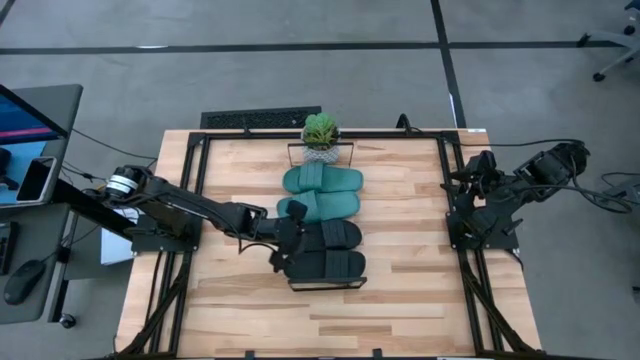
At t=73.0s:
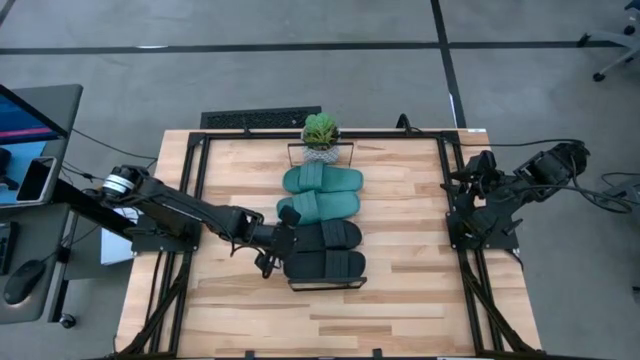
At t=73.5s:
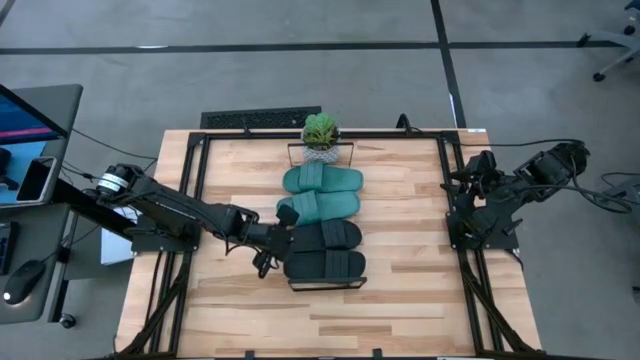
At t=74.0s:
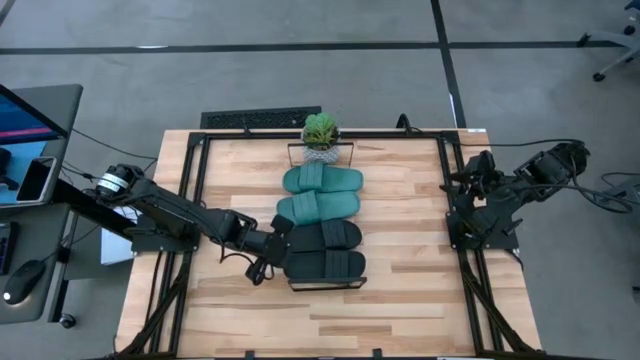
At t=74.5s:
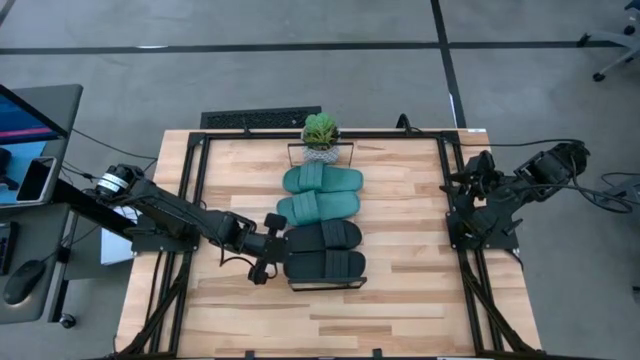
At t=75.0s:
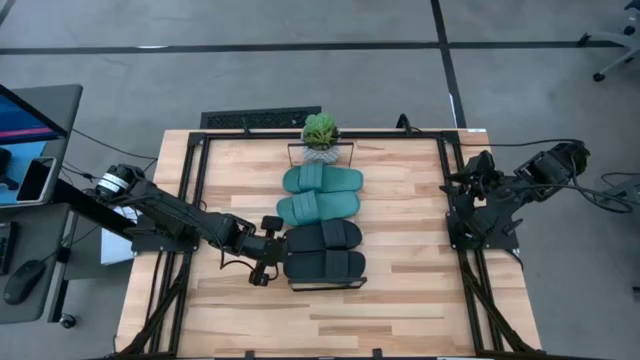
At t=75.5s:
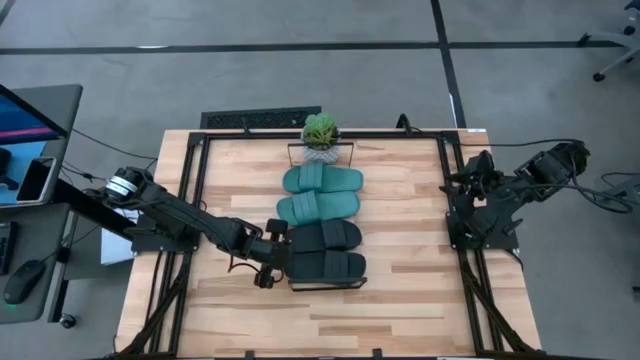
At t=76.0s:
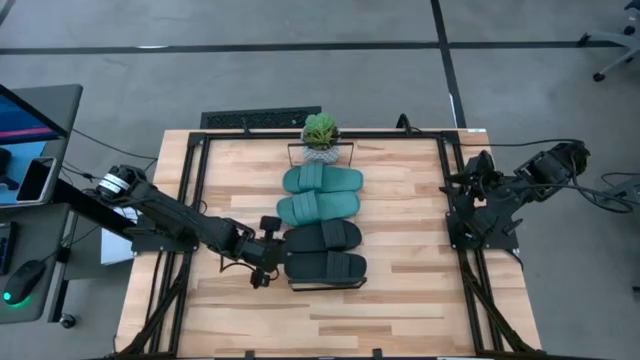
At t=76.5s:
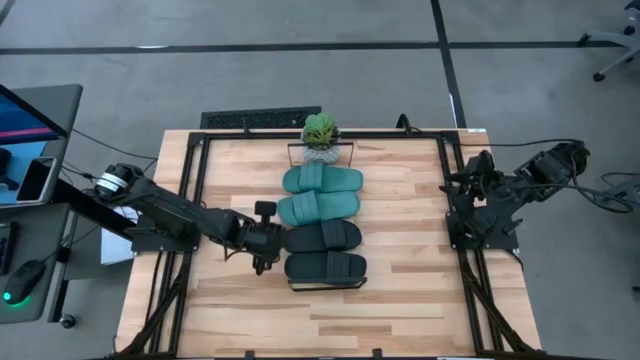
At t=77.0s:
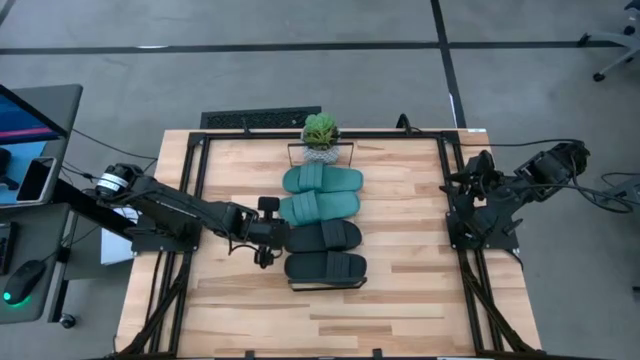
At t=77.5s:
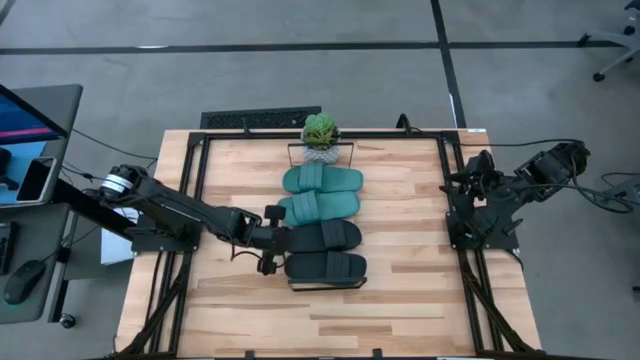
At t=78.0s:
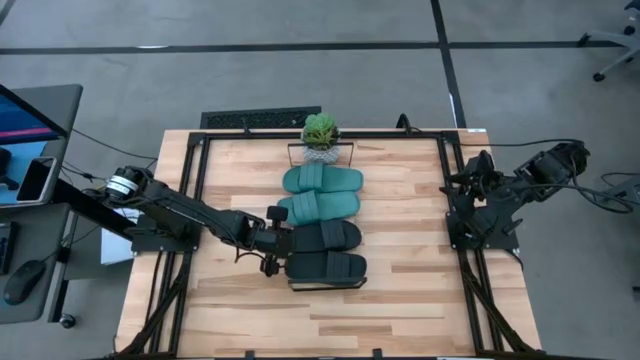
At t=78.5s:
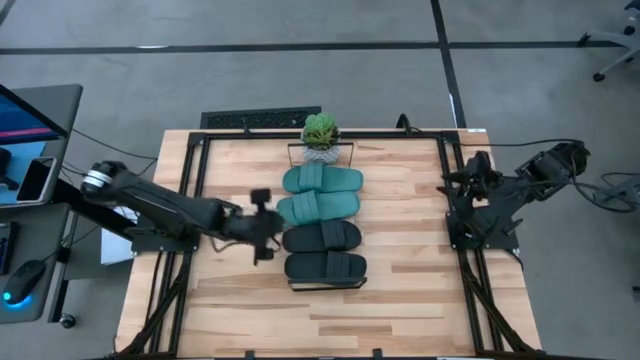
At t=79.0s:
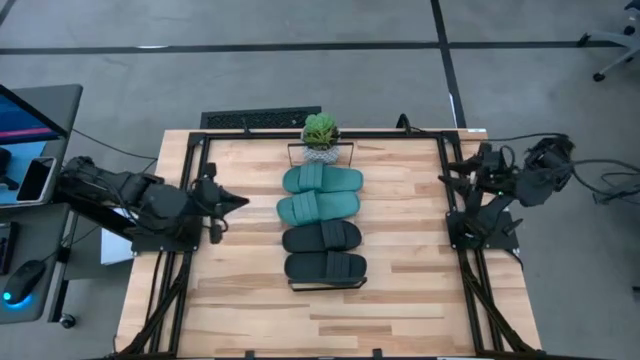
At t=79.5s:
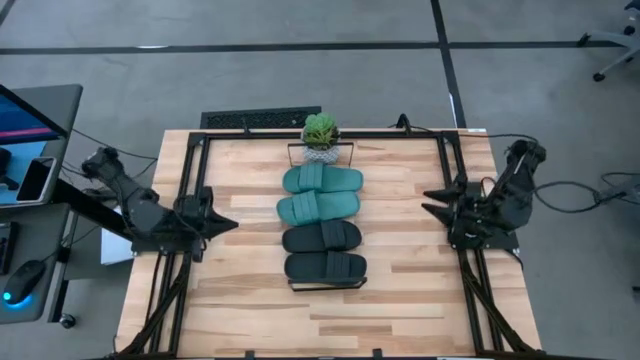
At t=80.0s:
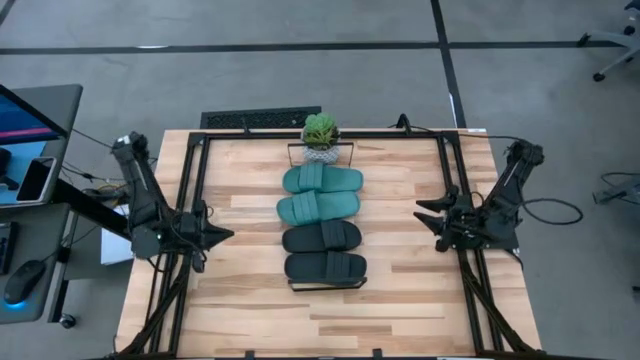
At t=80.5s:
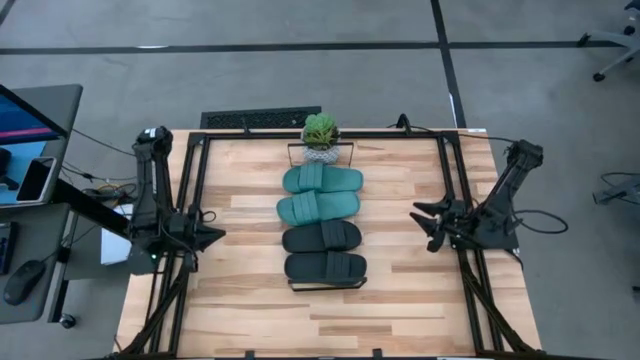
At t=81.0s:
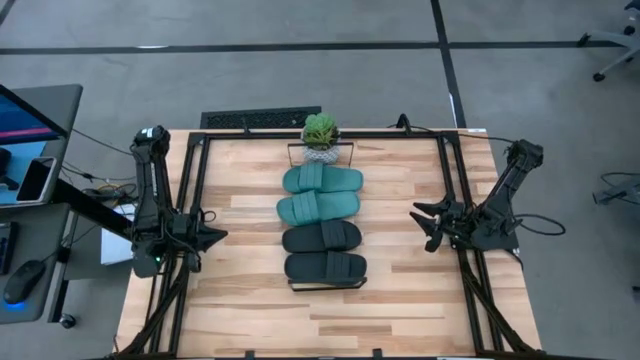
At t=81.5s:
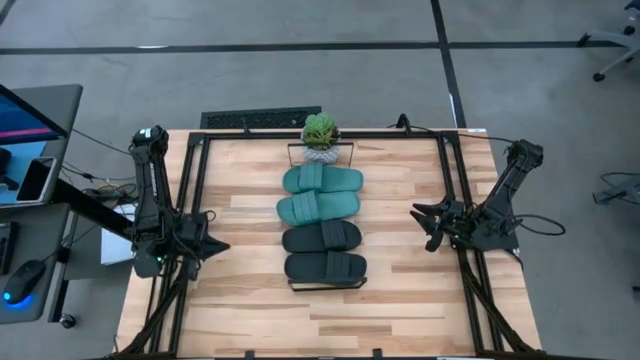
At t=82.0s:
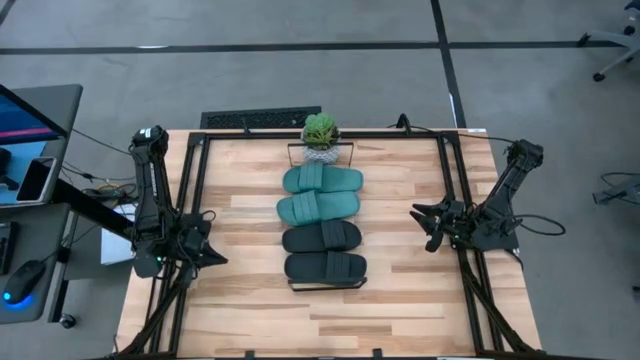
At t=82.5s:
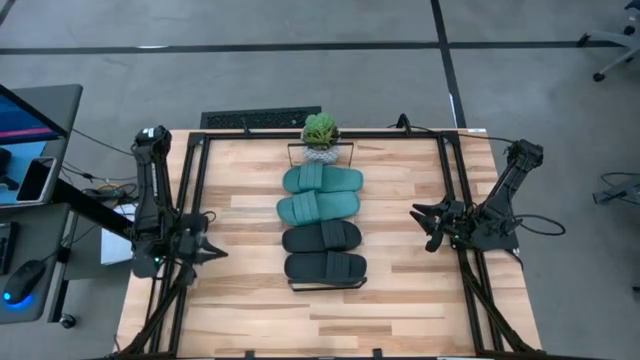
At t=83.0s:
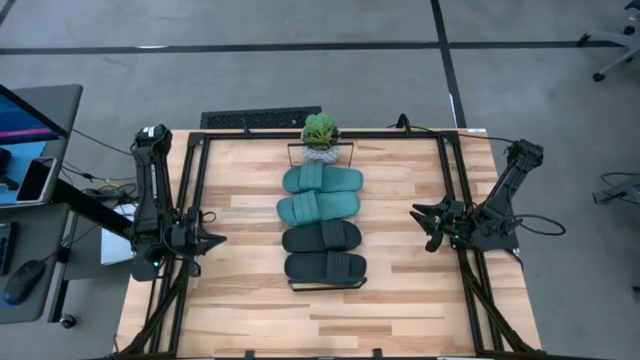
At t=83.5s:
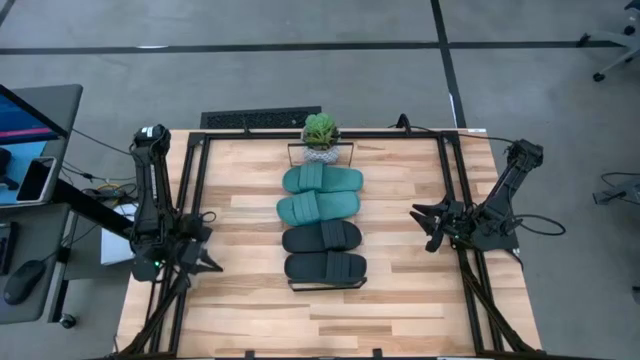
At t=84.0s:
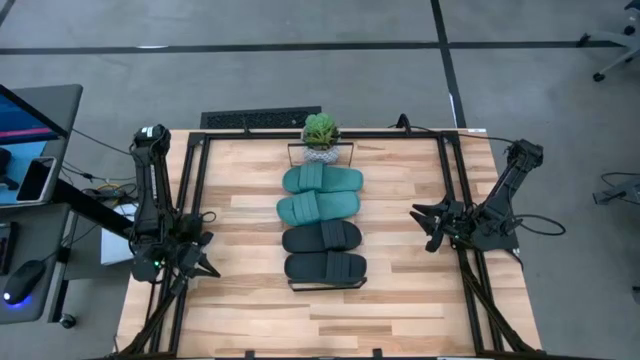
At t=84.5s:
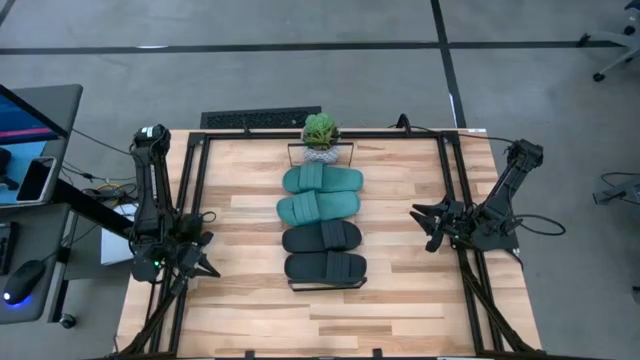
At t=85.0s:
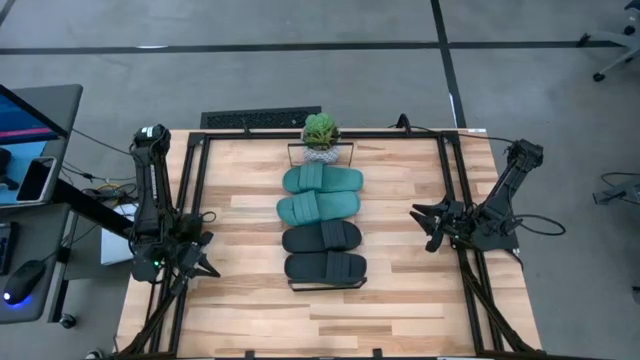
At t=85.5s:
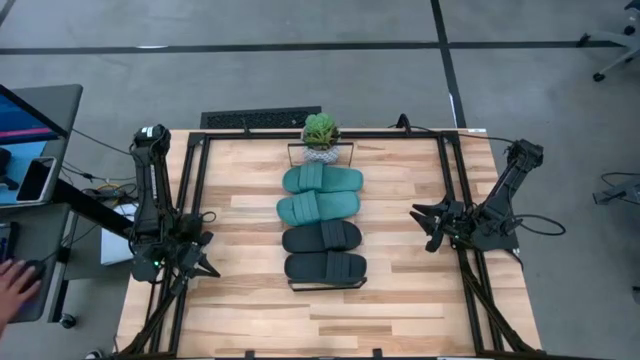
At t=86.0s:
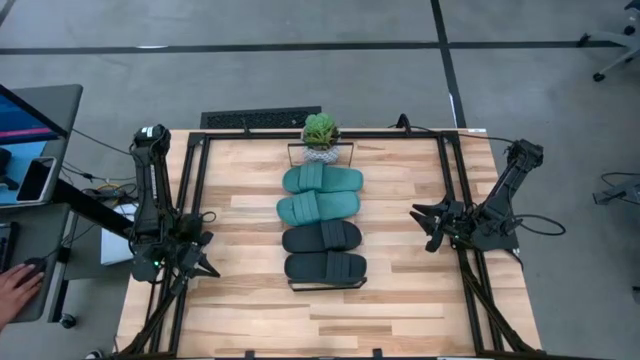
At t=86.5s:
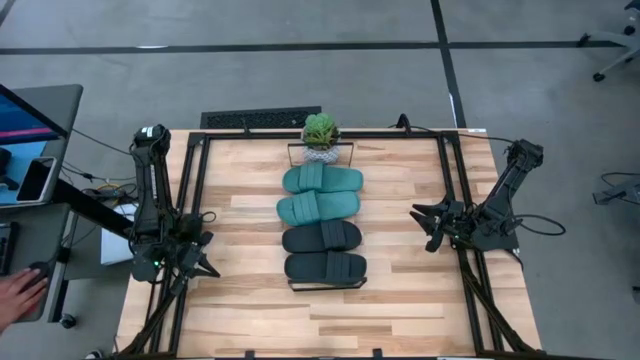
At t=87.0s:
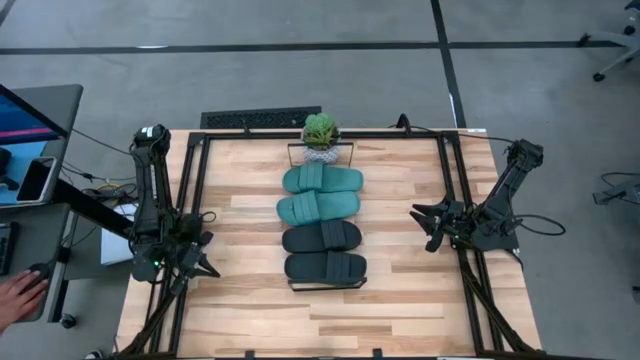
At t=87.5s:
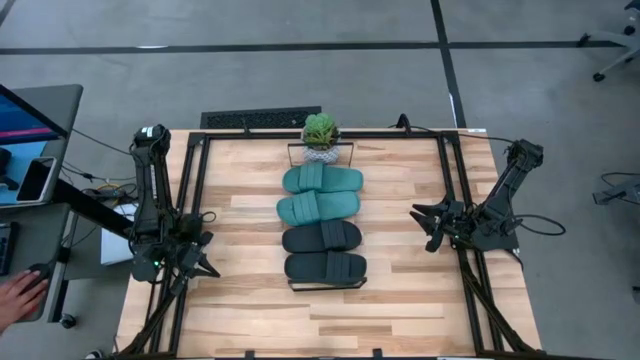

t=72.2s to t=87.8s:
Task: Pick and place slides into the shelf
Return to Home Position

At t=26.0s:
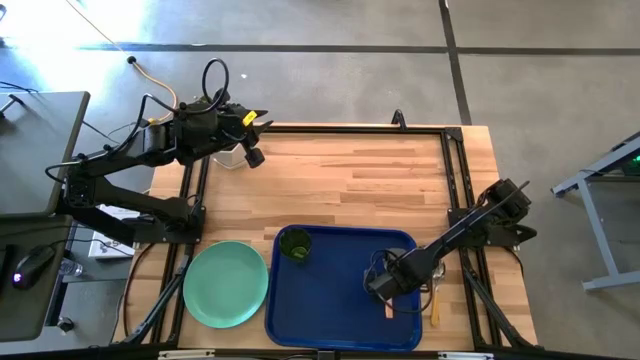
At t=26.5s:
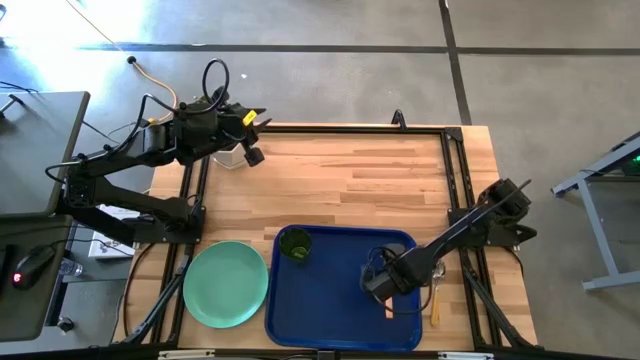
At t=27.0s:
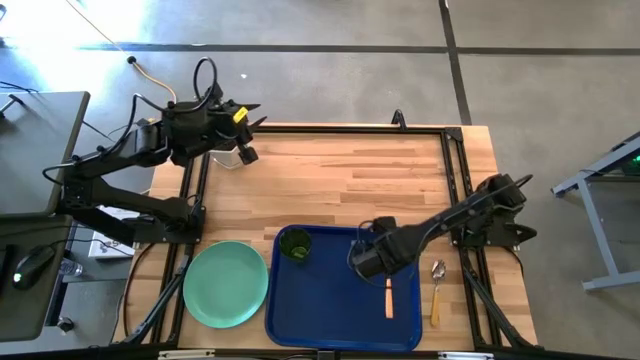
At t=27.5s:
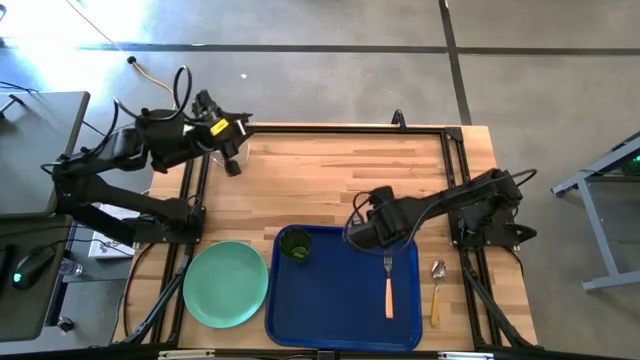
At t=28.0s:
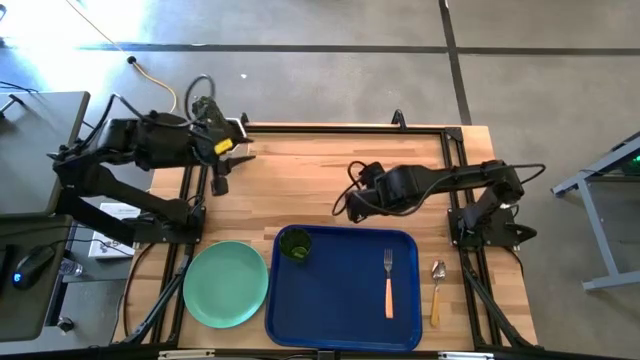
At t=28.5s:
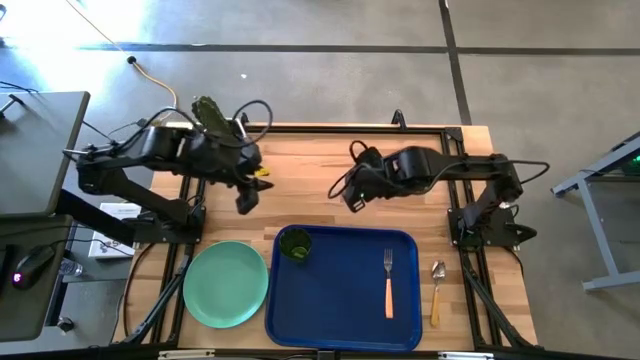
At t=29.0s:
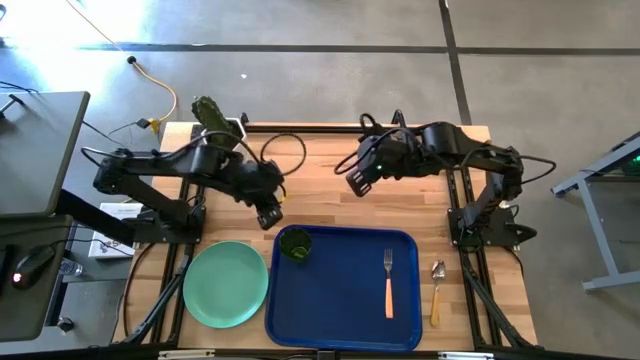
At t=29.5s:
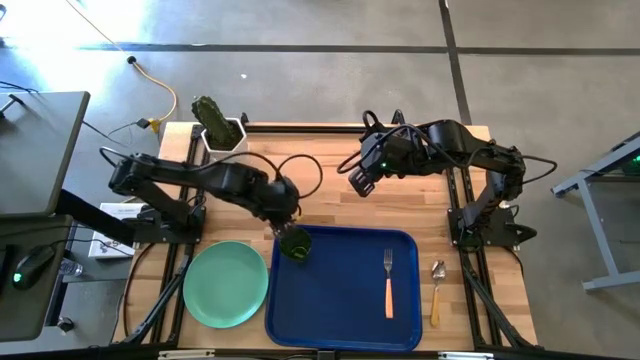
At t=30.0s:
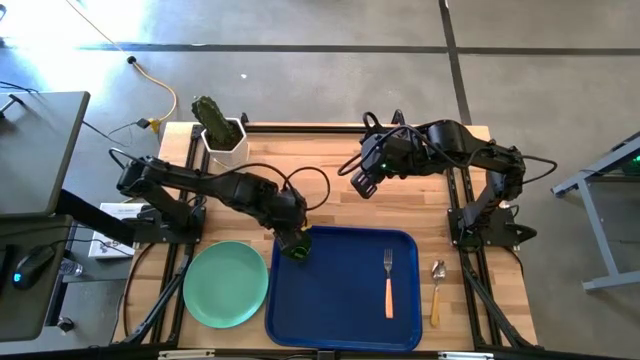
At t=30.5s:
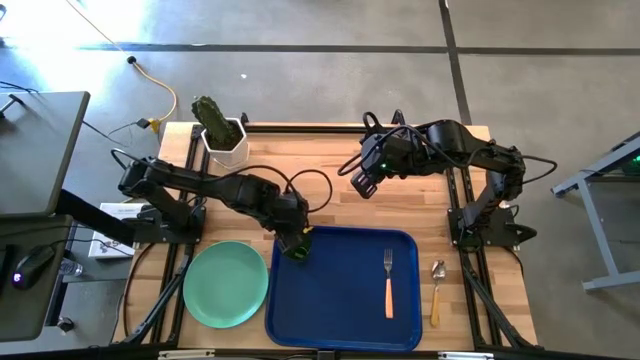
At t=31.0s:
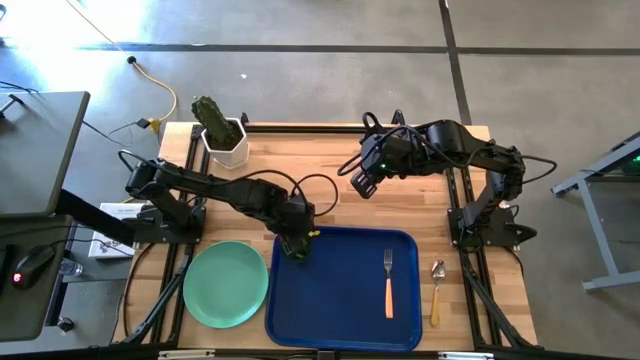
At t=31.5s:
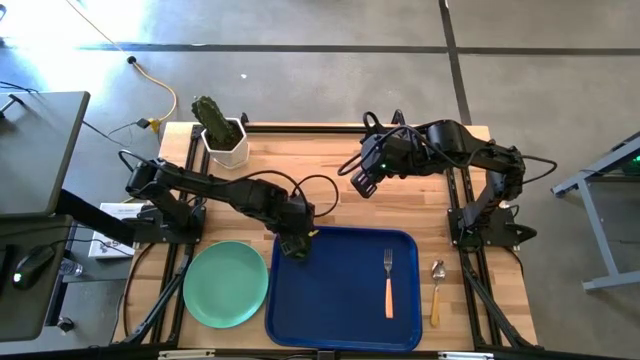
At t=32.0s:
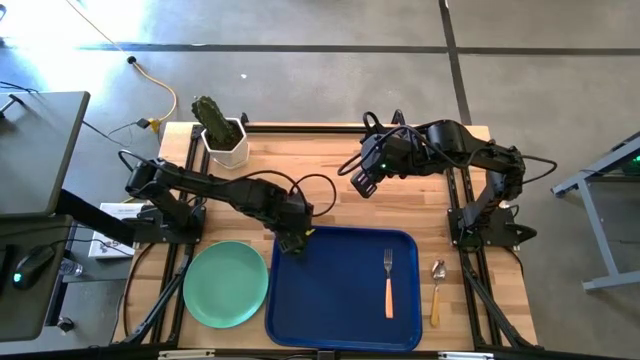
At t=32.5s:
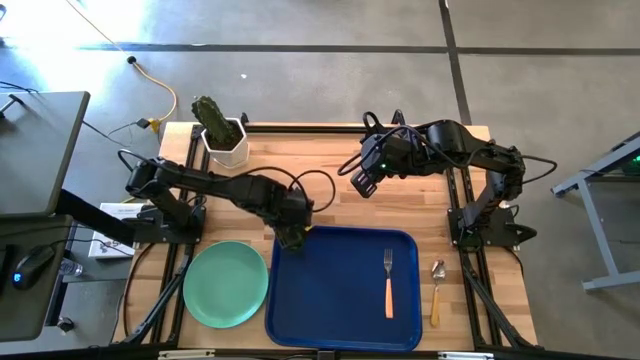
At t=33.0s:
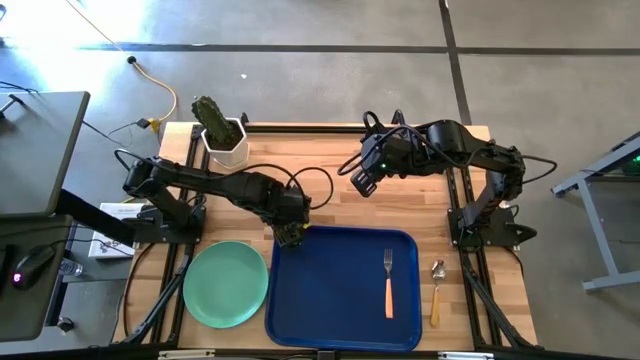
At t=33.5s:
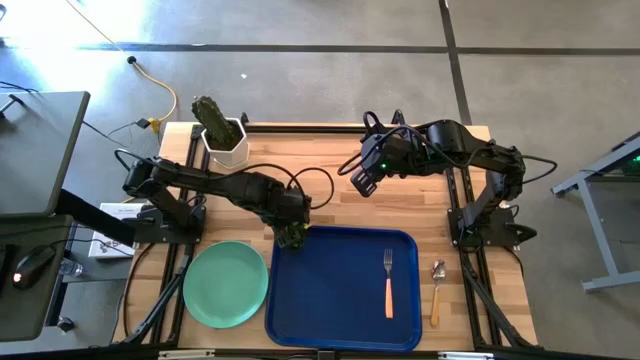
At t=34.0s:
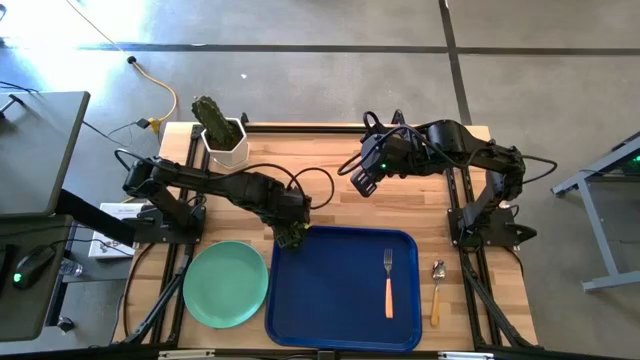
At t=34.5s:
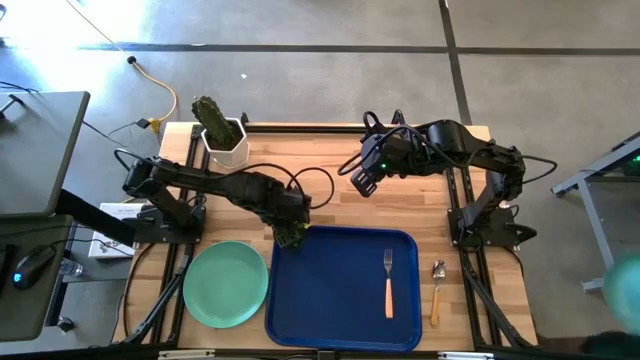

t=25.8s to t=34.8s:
Task: Pick and place plate/cup/fork/spoon on tray
Adjust the green glass on the blue tray
